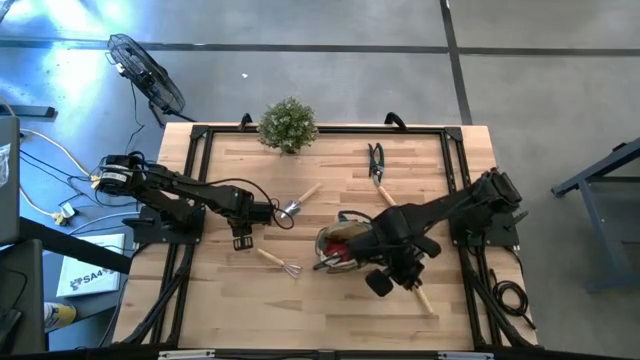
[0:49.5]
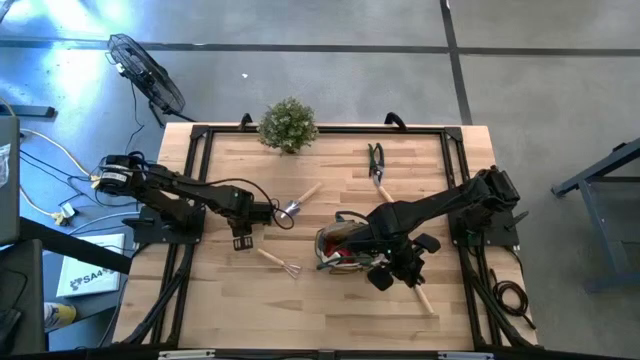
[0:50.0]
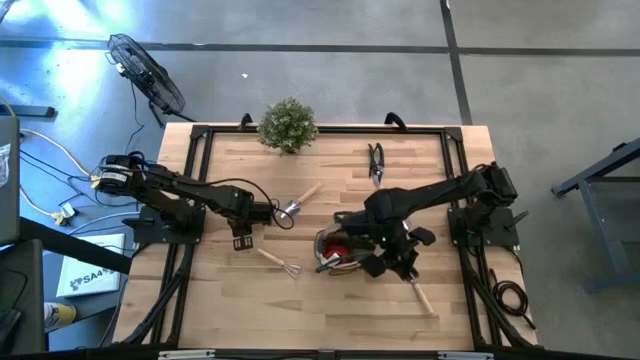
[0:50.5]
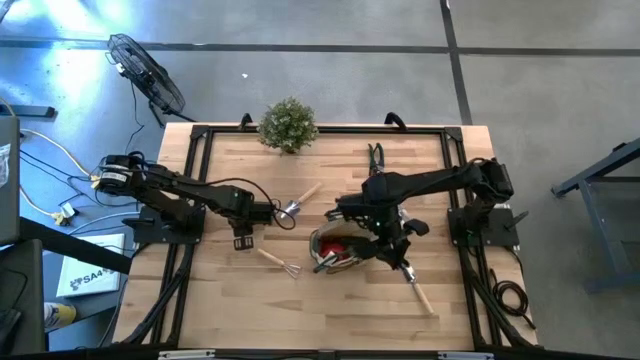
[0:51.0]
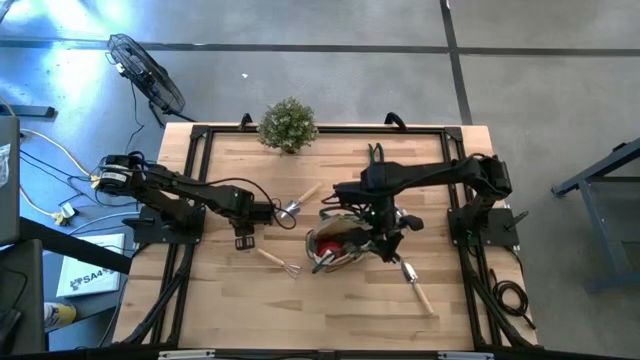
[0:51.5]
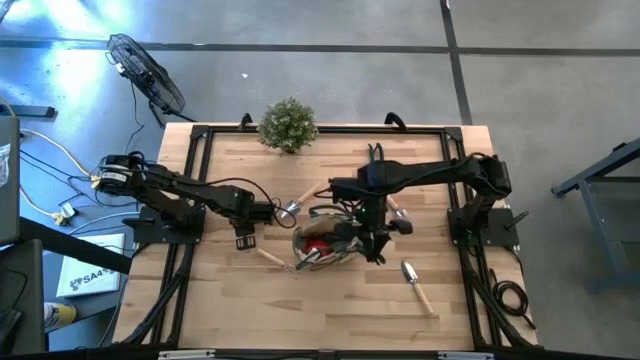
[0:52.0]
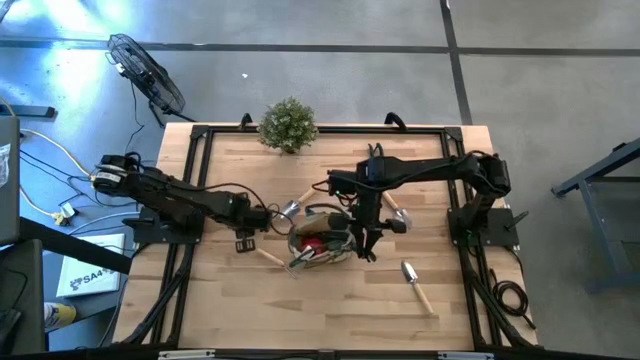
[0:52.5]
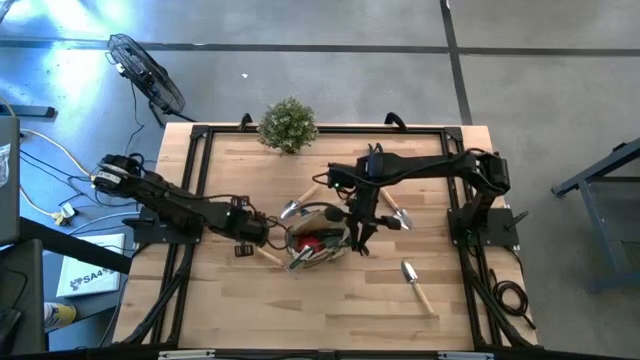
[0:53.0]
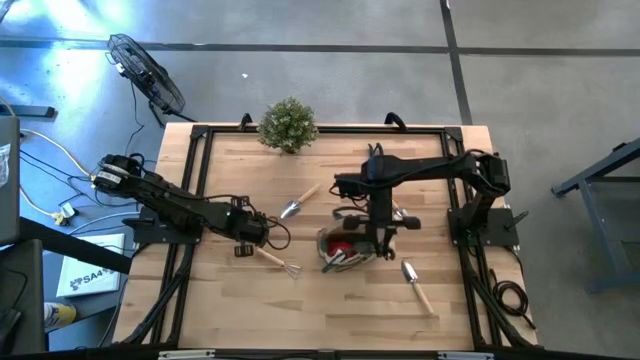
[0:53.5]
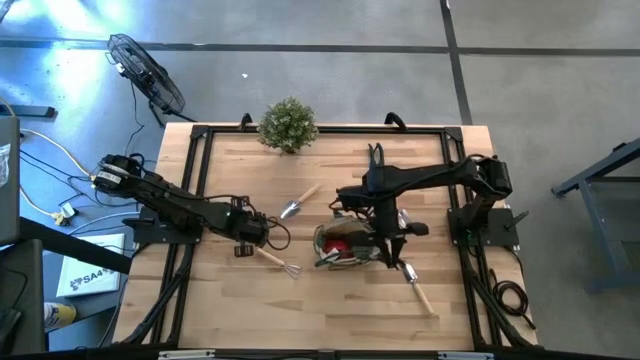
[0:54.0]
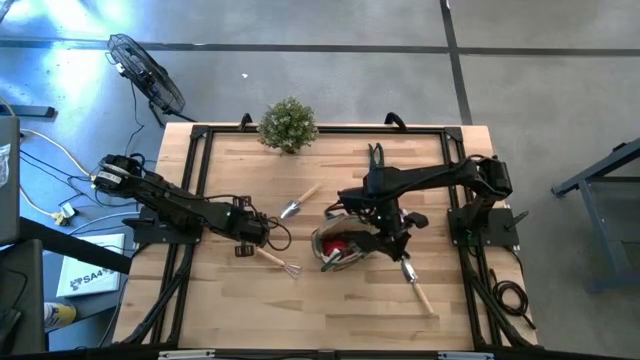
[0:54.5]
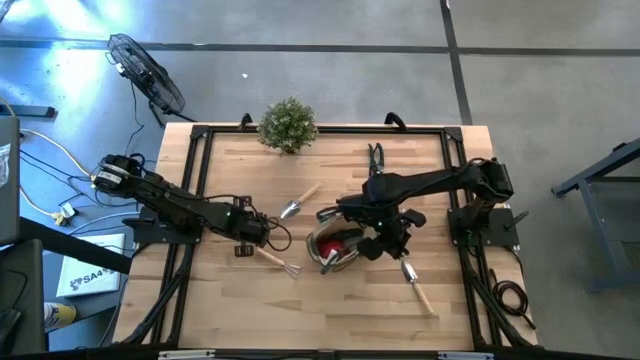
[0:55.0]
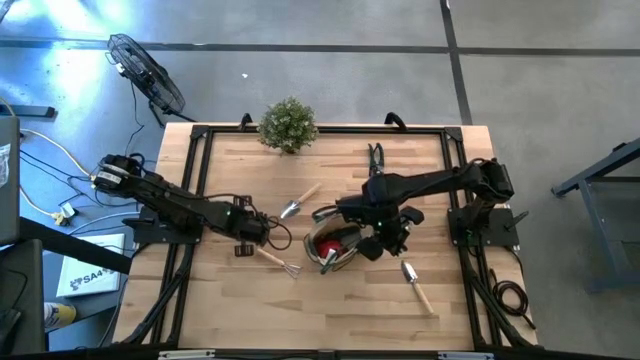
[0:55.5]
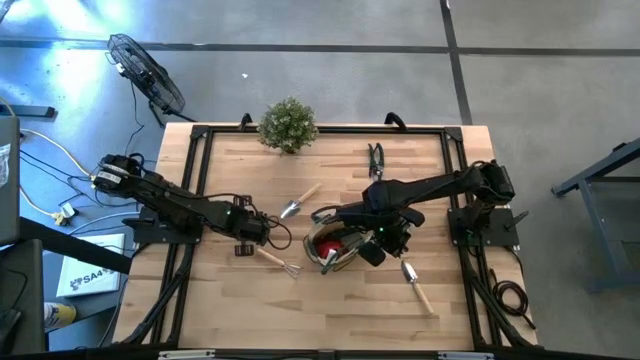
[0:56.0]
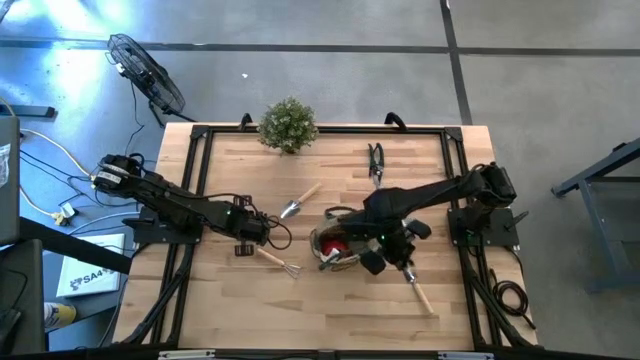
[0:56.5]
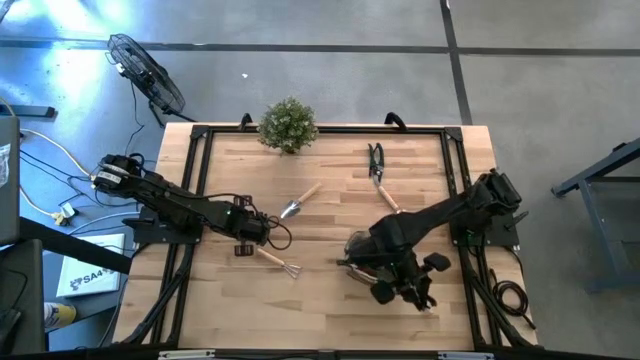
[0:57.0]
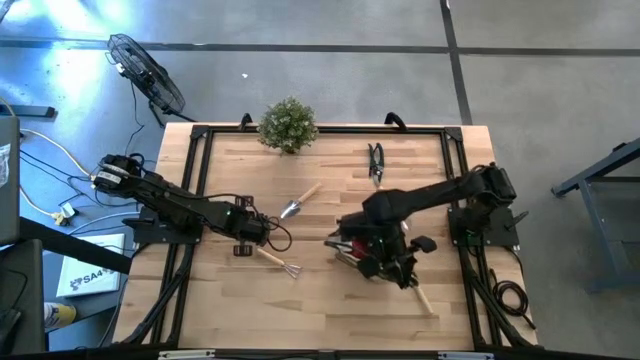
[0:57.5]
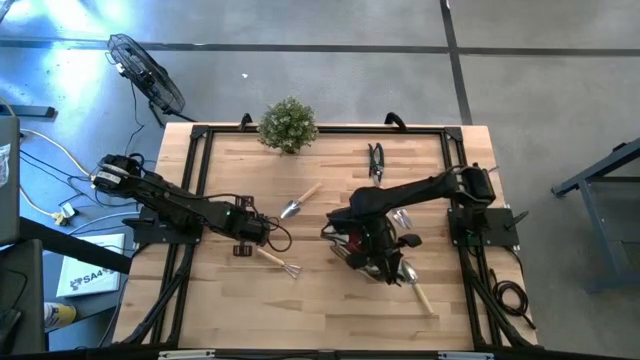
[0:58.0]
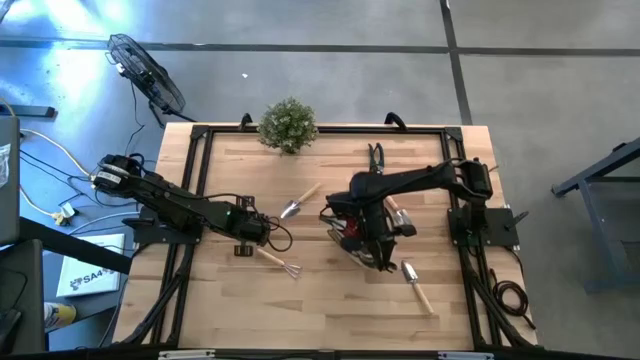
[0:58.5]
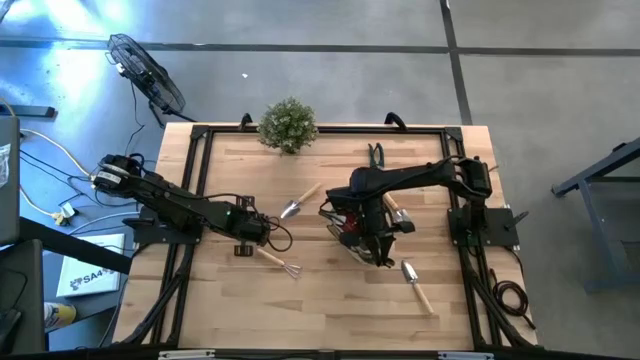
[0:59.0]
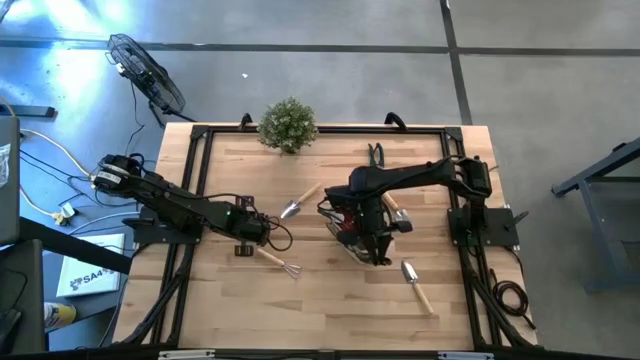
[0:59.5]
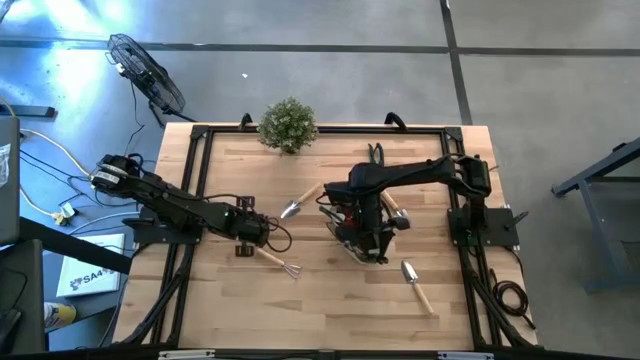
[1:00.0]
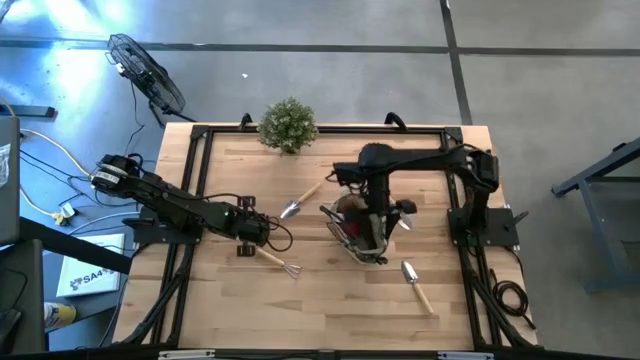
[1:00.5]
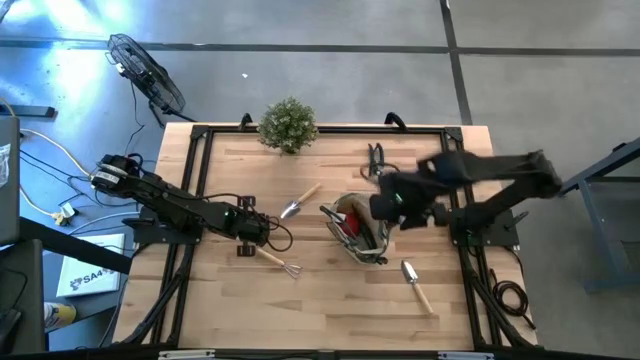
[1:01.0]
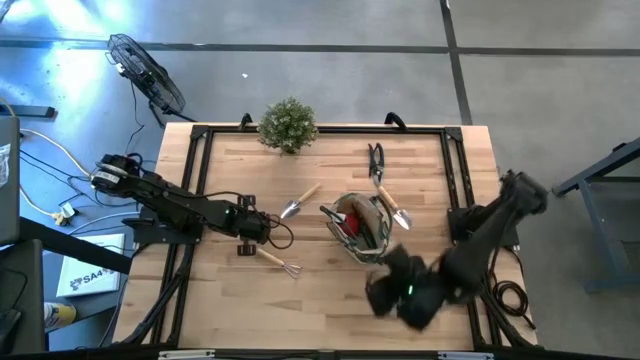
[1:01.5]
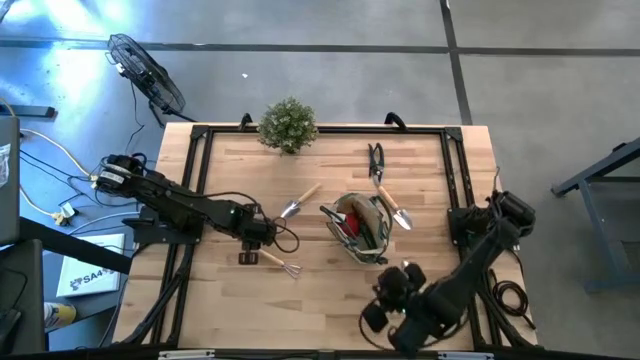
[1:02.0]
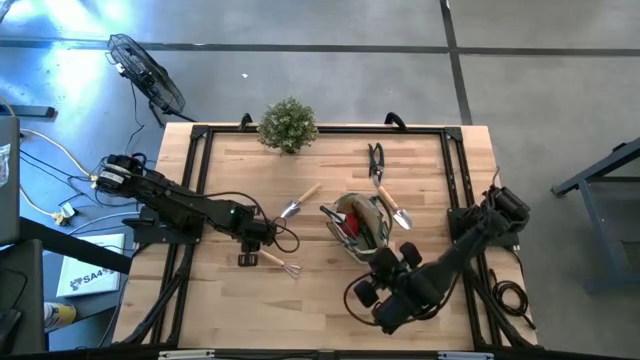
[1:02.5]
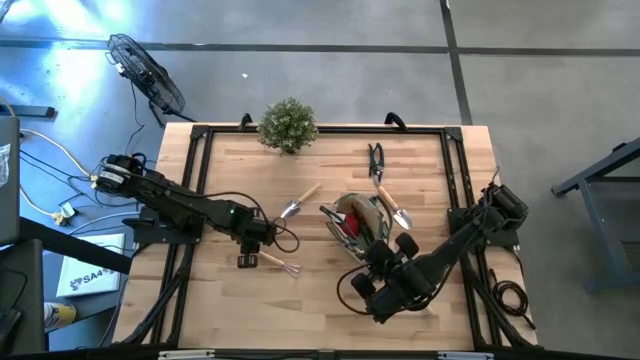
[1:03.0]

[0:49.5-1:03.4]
Task: Pick & Place Garden tools in Gardening bag
Put the bottom green scissors into the green bag

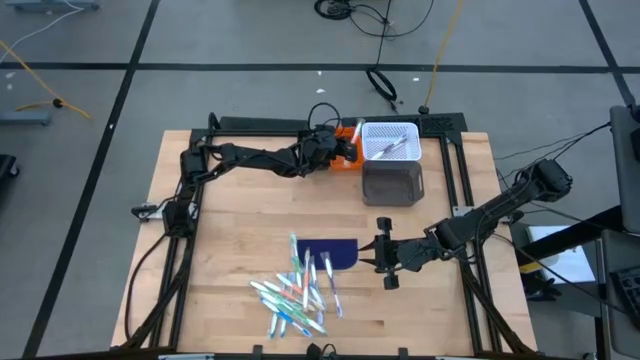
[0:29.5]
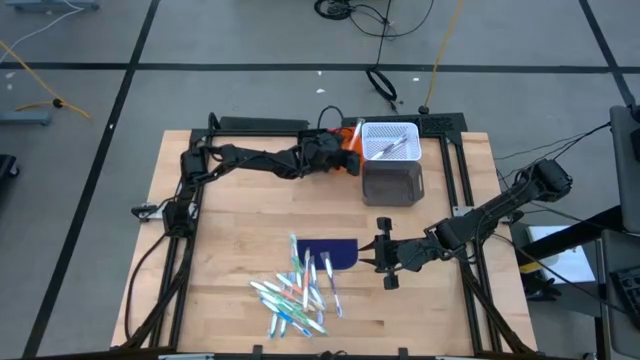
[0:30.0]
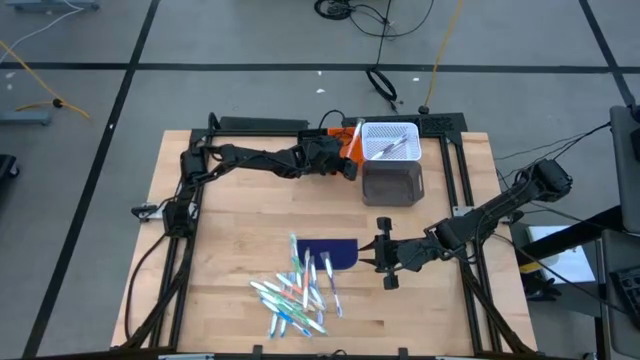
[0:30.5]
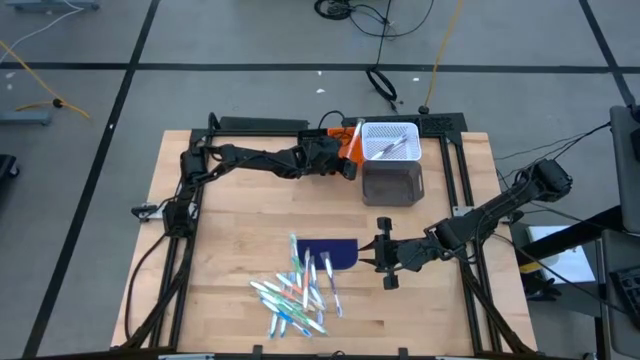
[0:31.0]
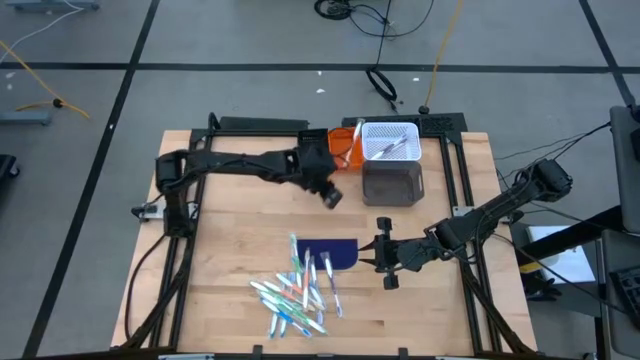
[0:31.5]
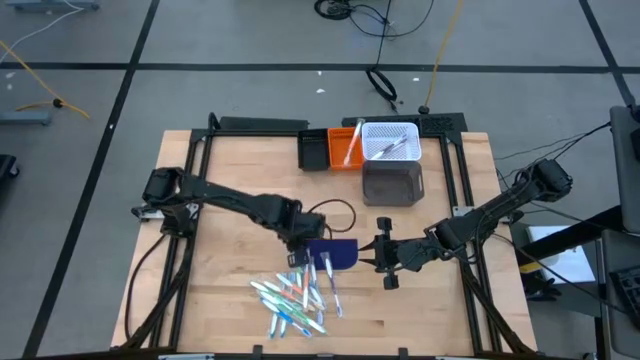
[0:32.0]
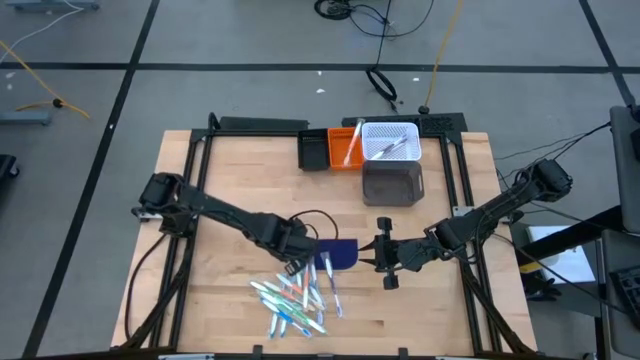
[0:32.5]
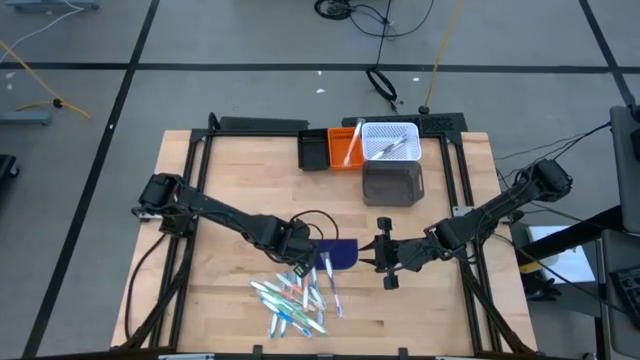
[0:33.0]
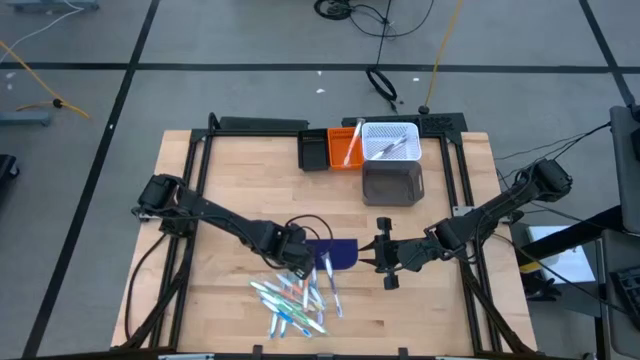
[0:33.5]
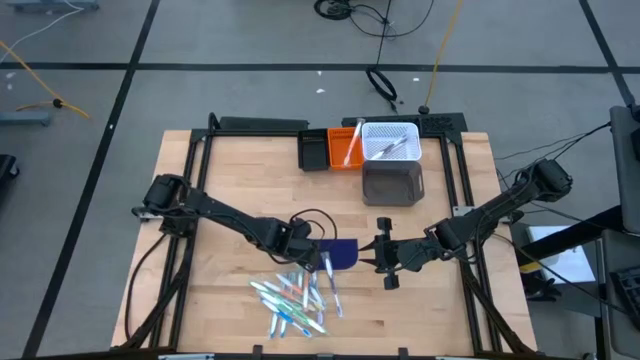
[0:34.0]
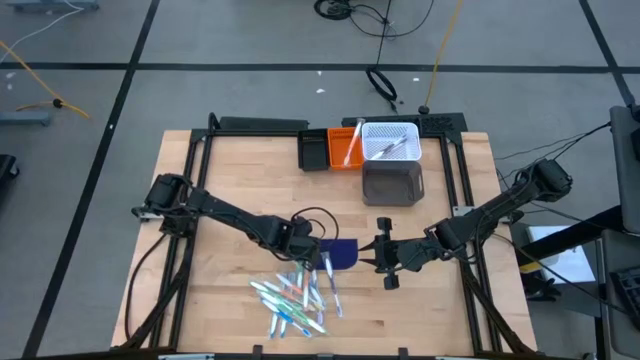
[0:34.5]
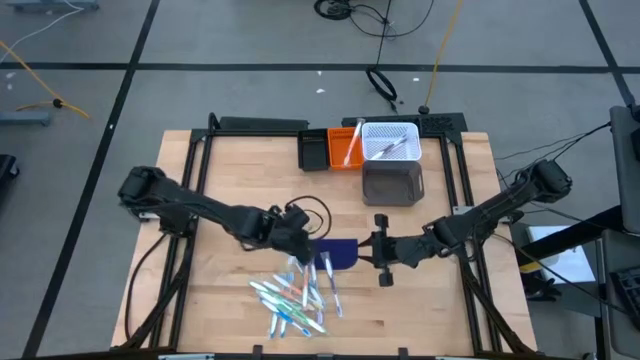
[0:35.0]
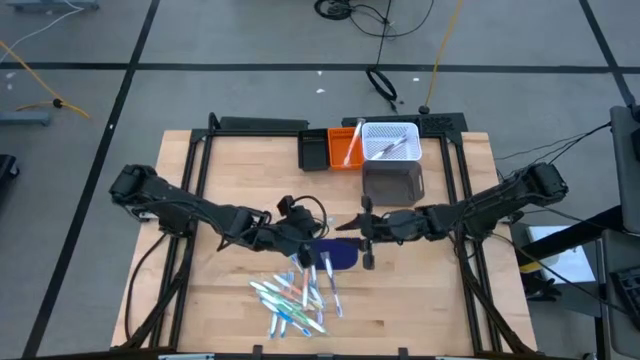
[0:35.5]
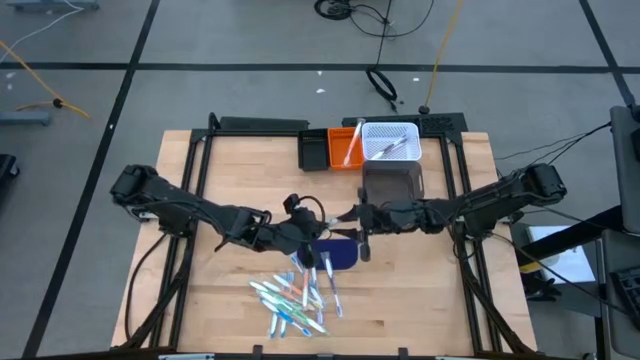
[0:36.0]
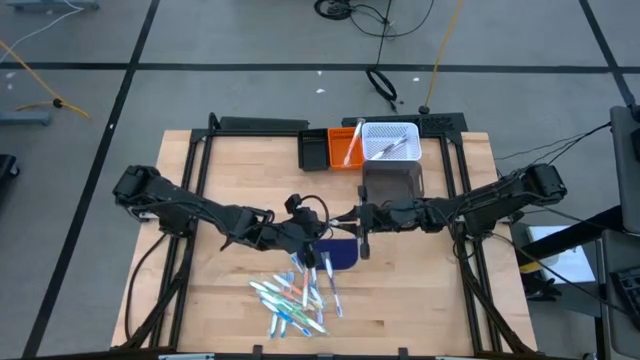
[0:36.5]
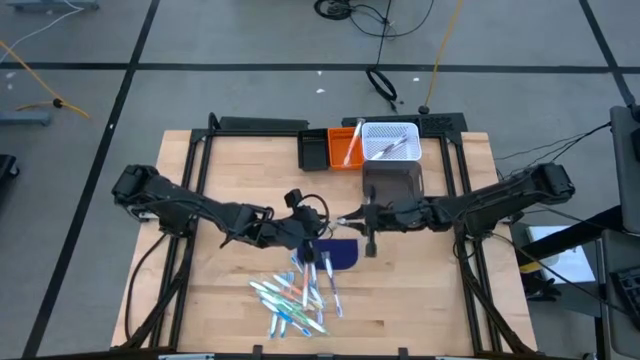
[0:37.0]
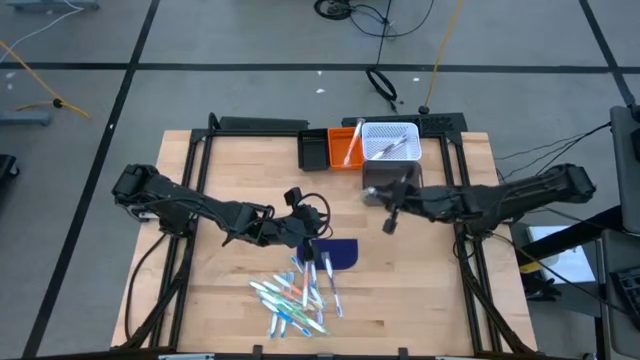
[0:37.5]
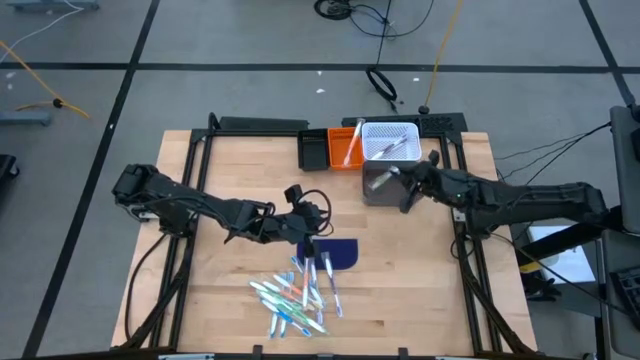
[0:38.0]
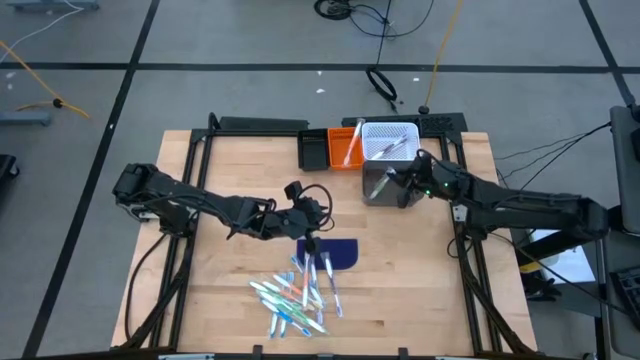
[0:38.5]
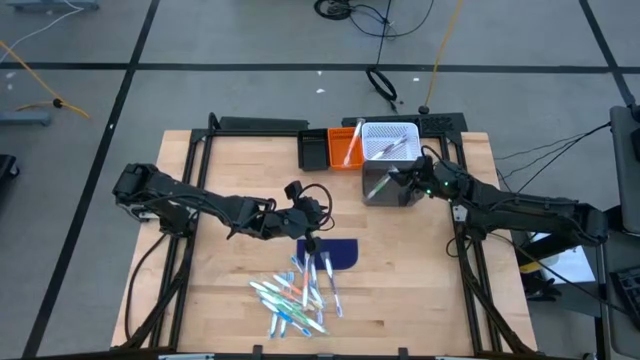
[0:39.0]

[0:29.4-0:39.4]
Task: Pick & Place Toothbrushes
Put the green toothbrush into the gray bin
